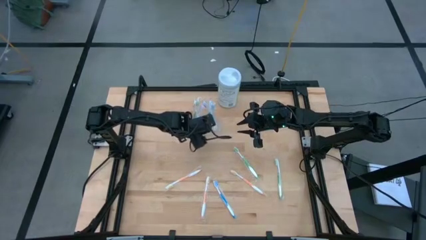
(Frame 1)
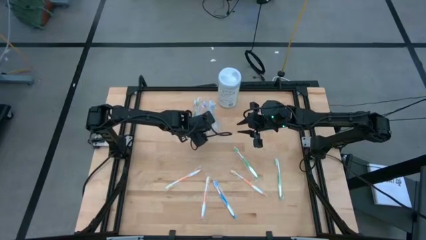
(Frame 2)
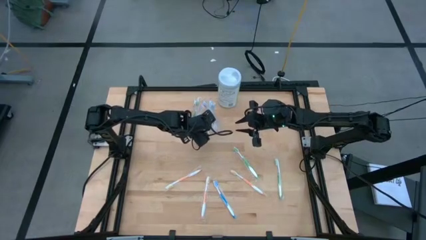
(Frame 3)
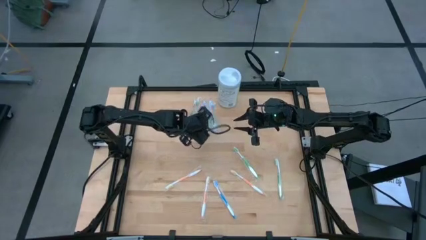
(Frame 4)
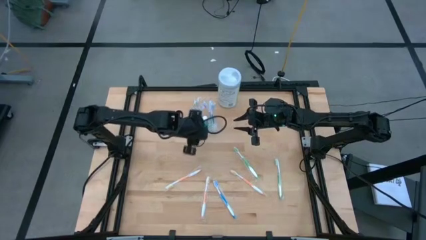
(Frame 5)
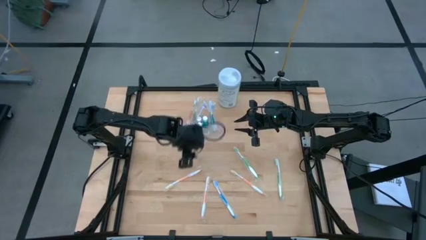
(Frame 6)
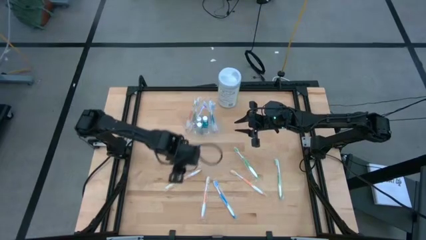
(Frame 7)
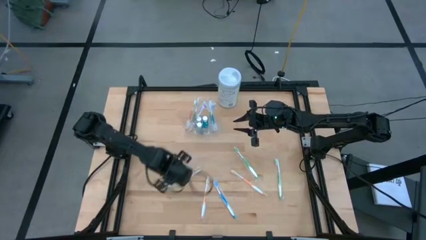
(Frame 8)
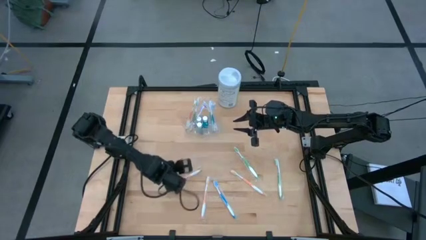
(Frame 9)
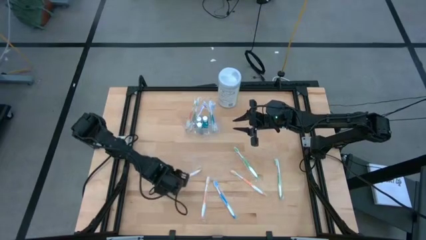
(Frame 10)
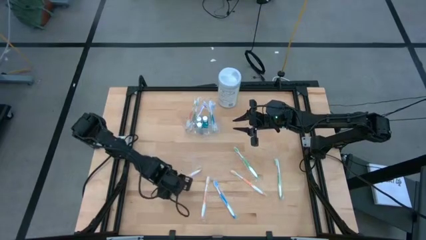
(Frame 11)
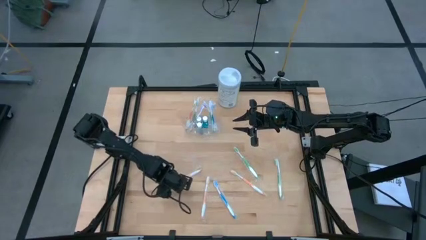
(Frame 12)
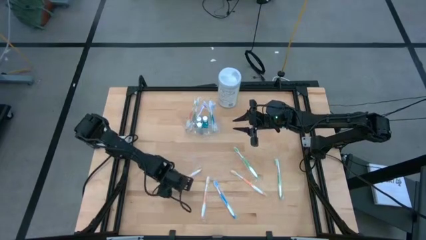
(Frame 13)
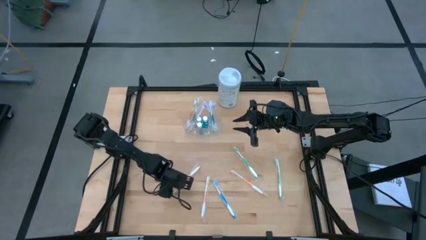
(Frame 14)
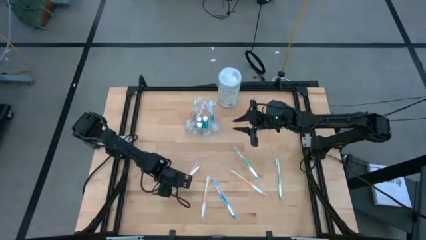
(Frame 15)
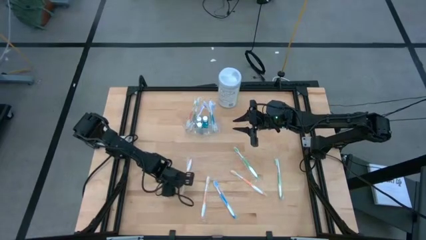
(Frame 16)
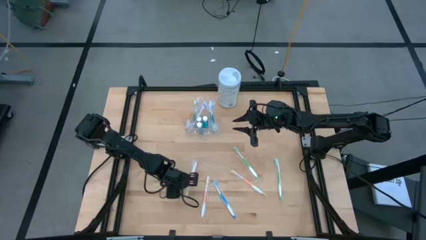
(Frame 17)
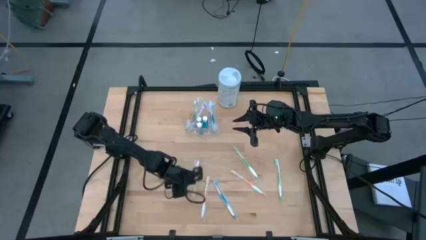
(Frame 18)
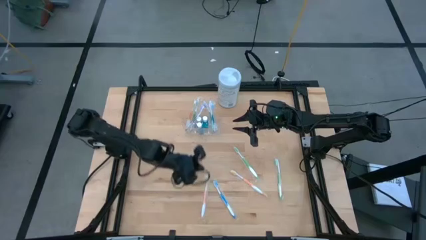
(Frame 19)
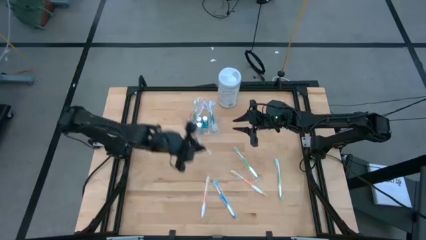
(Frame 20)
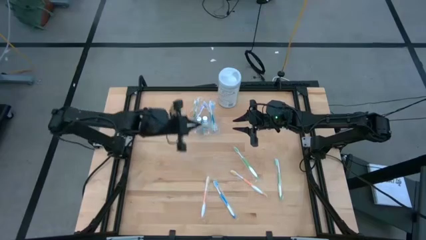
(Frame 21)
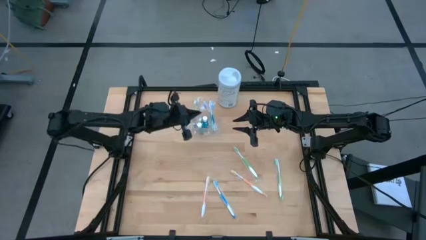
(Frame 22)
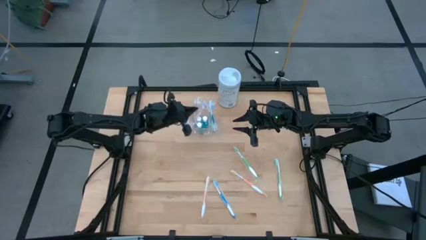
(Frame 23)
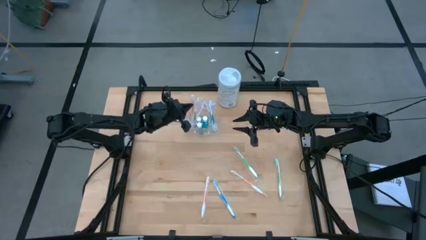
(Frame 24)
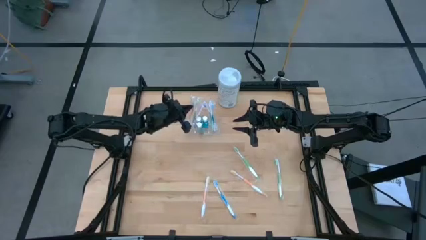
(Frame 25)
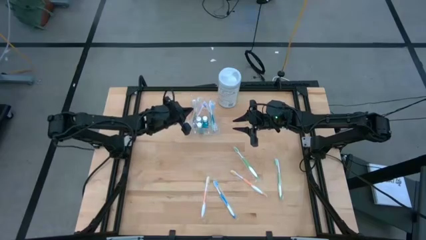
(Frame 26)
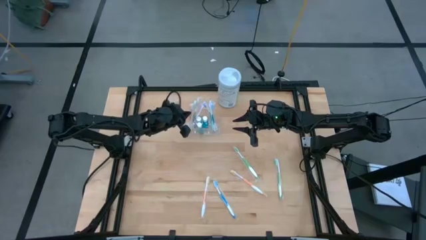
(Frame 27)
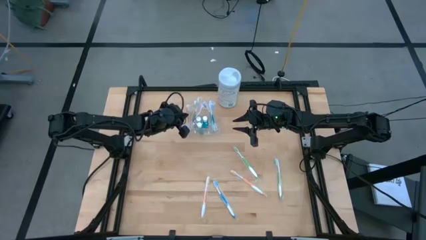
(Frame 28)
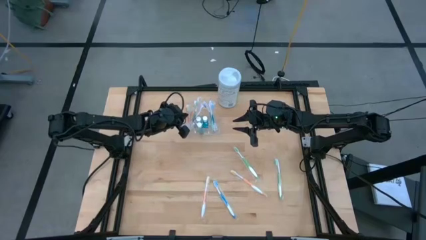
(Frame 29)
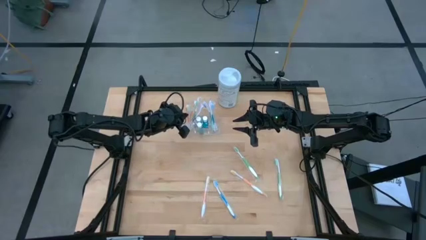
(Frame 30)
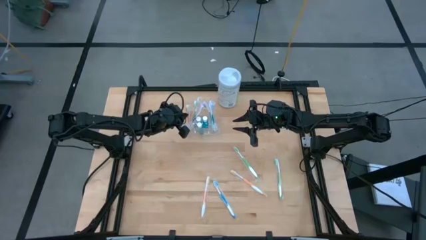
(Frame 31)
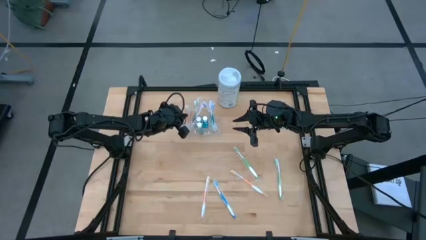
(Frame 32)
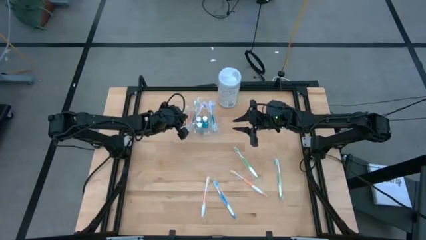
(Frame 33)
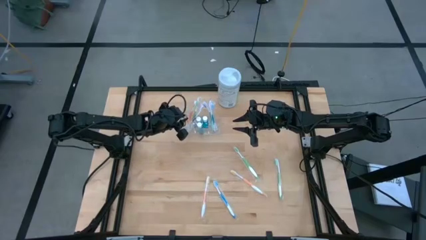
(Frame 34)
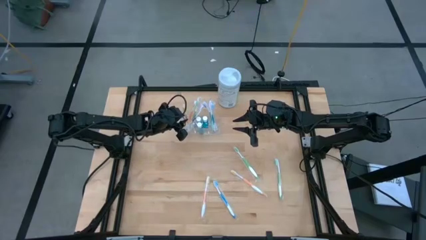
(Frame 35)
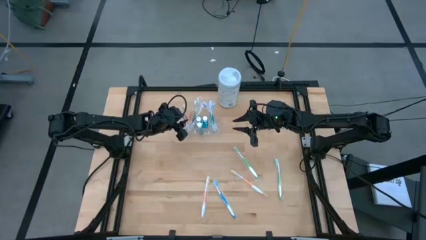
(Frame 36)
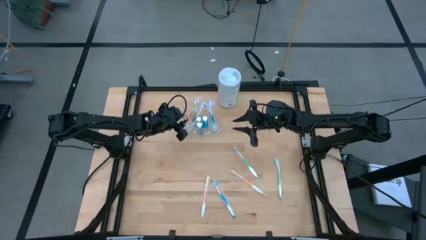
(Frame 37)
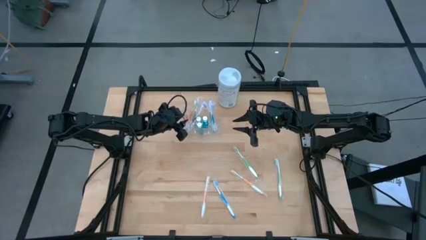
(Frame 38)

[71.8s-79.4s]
Task: Pick & Place toothbrushing station
Put the orange toothbrush into the transparent organizer

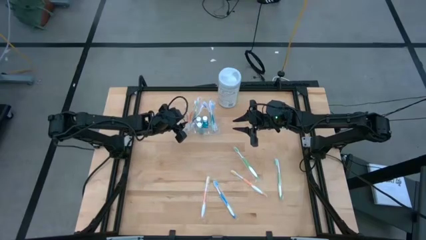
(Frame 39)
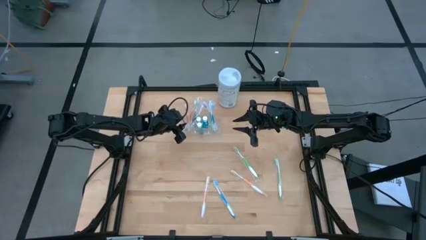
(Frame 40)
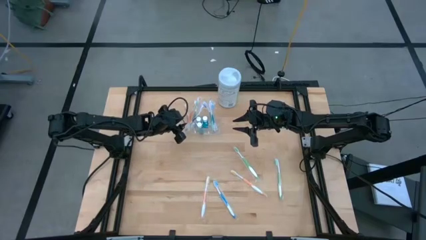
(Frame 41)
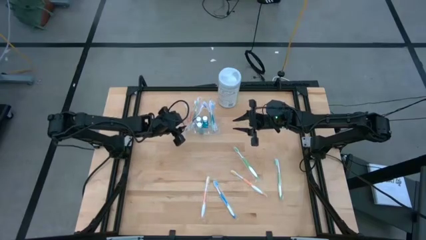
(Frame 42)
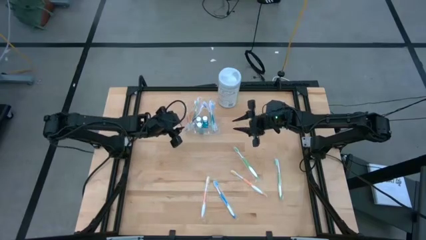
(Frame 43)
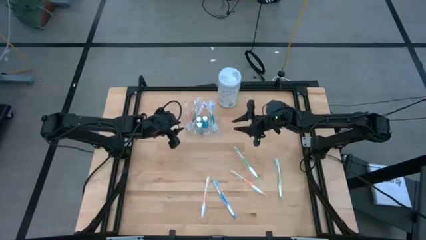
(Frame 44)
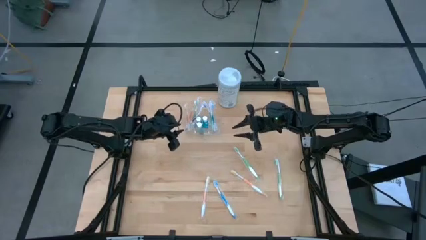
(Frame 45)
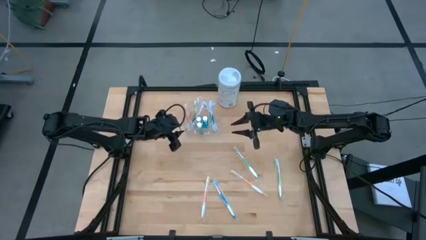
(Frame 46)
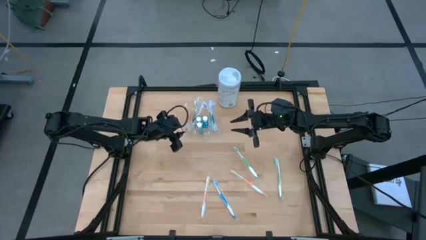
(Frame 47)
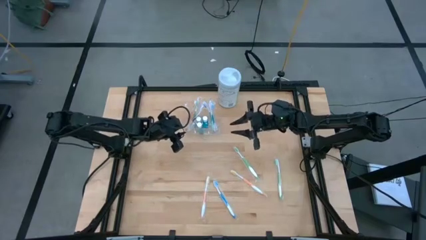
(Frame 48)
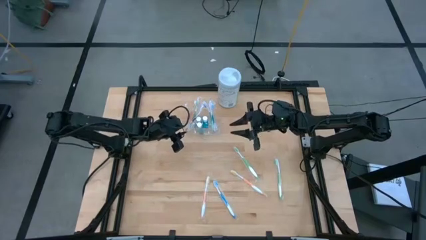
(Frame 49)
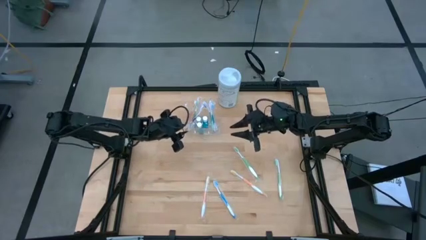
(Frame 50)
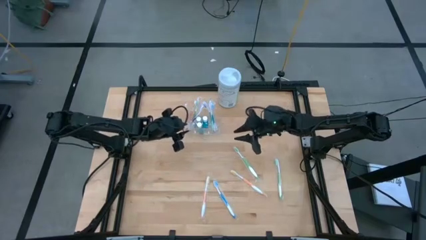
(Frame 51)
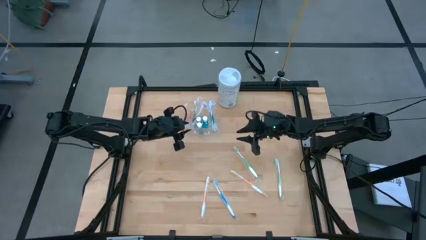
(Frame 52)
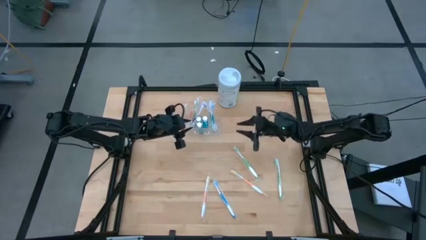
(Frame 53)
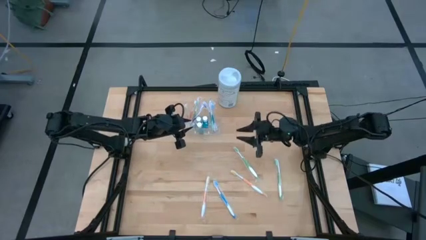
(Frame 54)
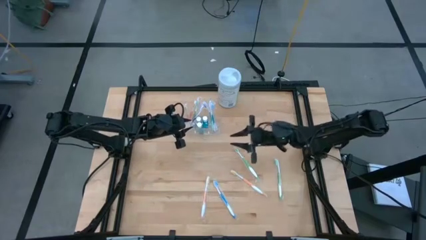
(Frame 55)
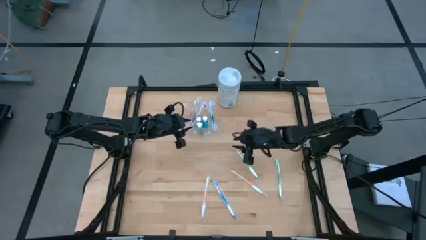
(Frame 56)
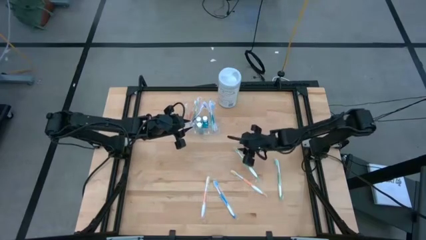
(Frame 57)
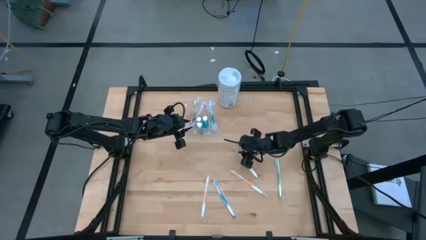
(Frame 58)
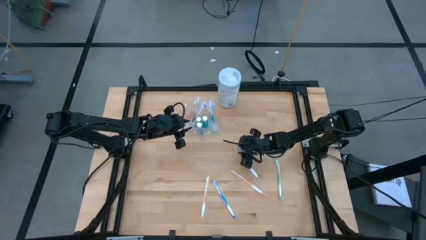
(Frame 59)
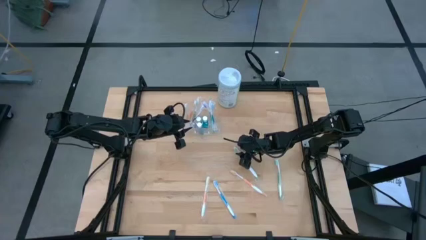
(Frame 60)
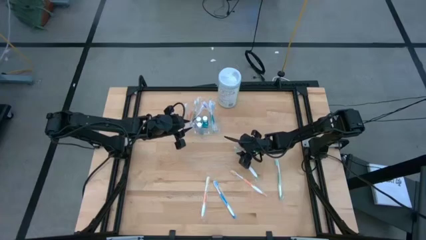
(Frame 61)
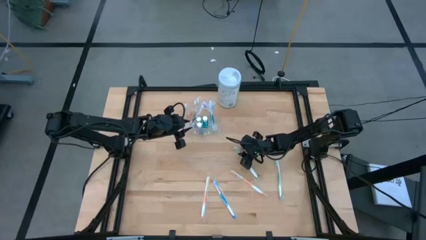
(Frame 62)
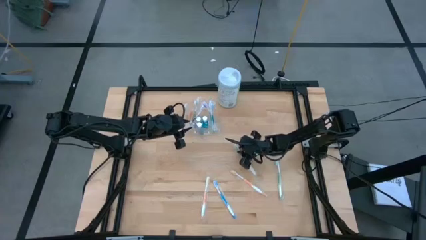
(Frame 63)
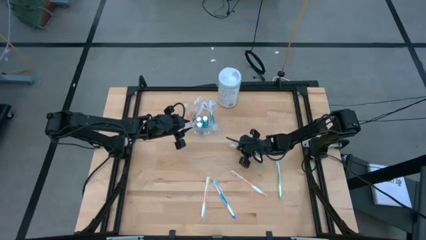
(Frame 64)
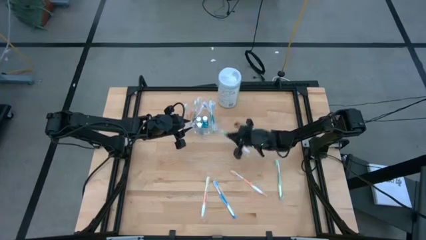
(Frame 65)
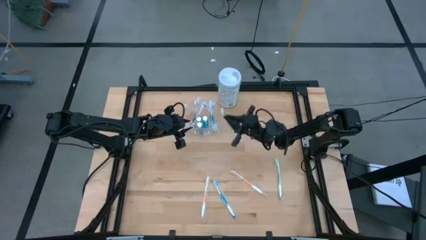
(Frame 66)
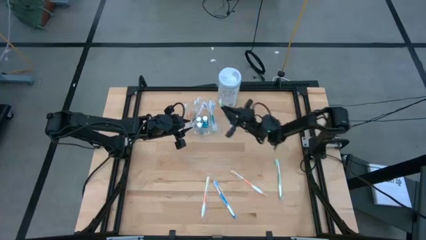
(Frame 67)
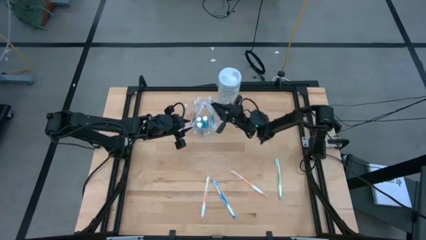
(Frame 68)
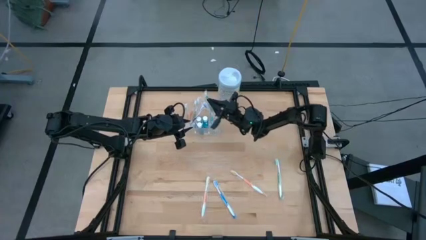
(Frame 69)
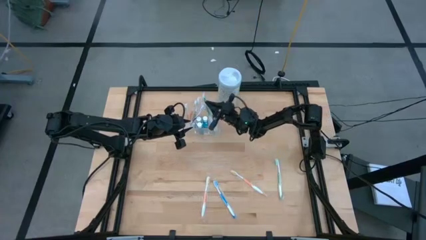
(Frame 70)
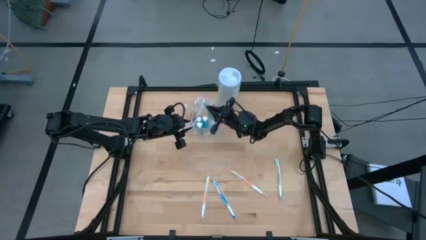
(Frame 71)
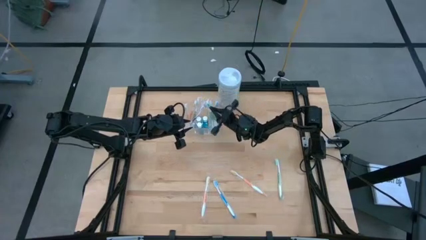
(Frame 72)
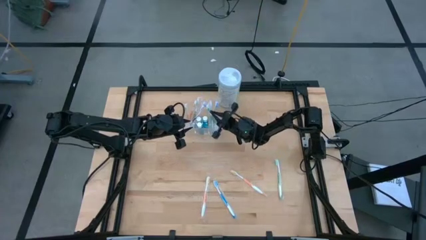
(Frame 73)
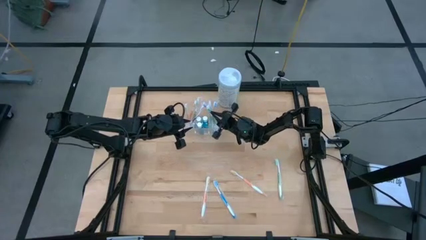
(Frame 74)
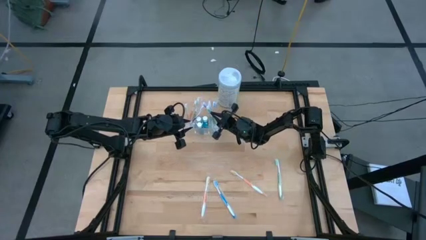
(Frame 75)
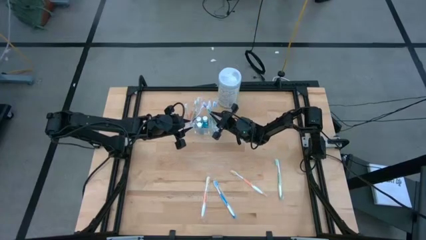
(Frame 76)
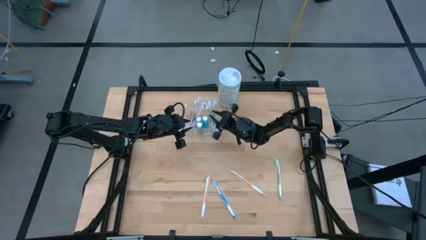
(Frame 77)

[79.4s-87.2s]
Put the green toothbrush into the transparent organizer
